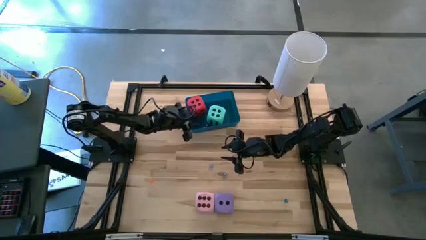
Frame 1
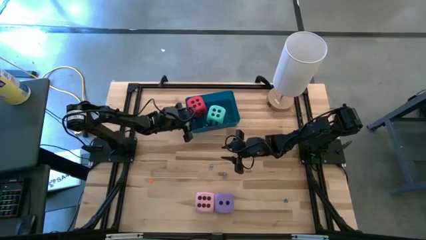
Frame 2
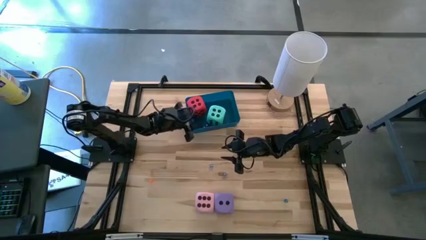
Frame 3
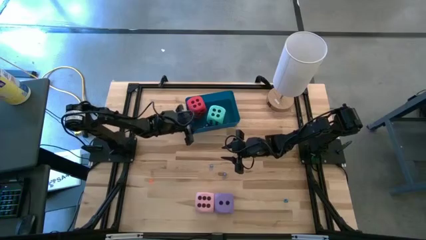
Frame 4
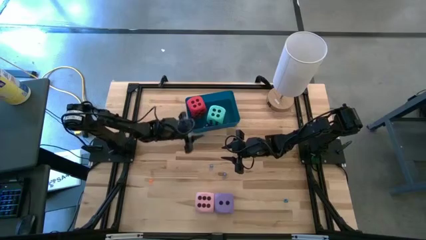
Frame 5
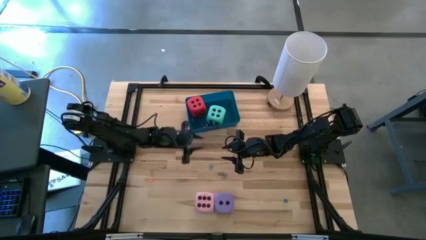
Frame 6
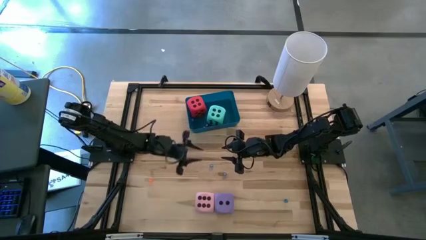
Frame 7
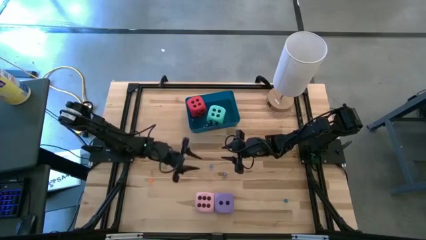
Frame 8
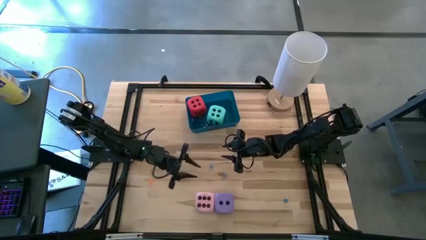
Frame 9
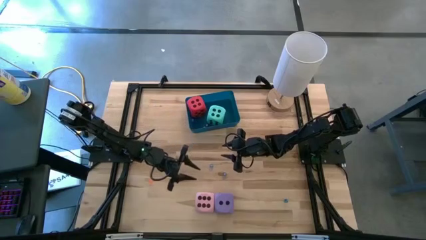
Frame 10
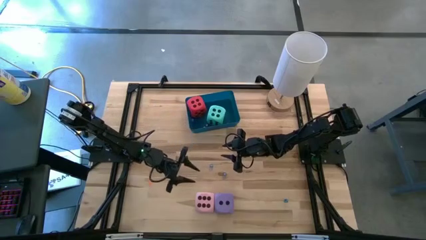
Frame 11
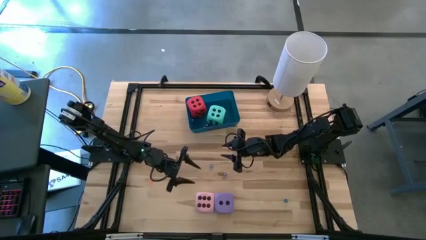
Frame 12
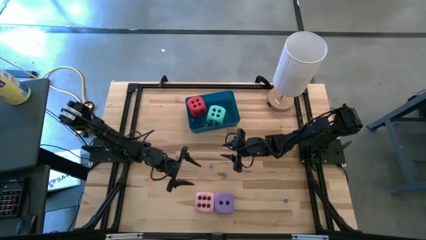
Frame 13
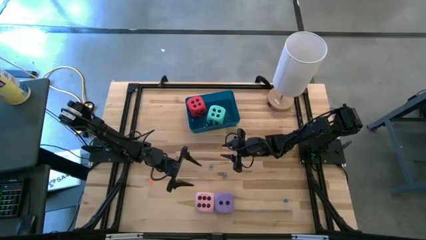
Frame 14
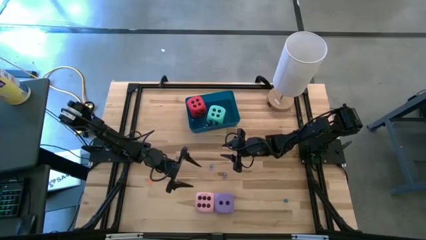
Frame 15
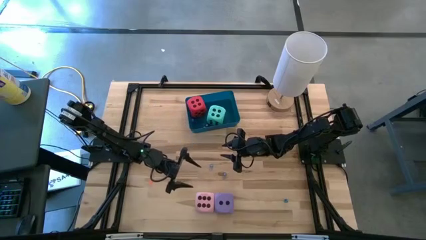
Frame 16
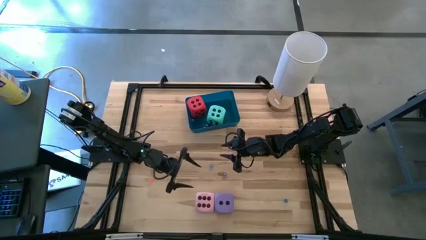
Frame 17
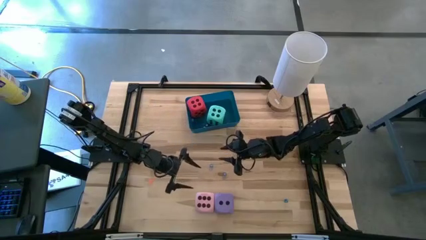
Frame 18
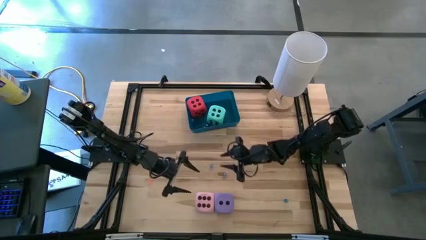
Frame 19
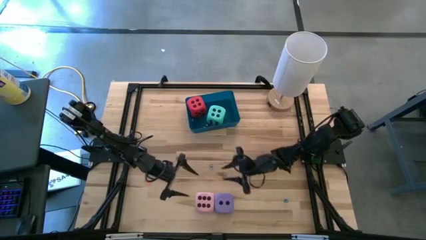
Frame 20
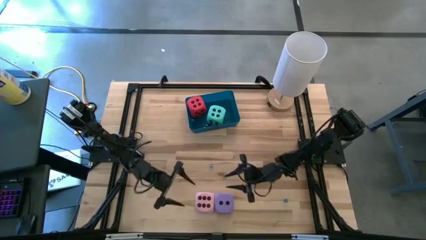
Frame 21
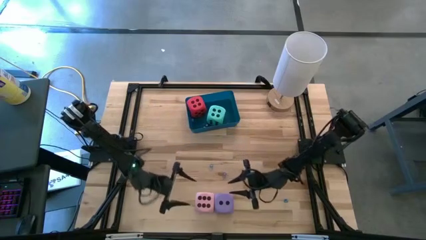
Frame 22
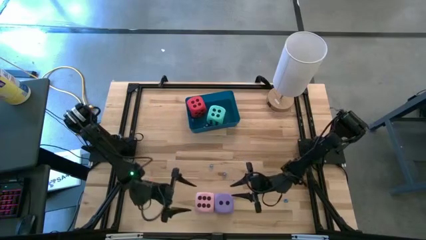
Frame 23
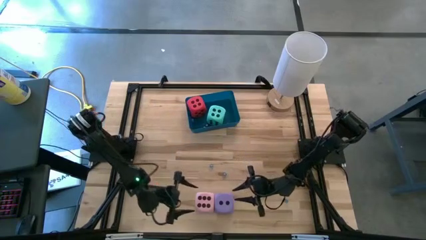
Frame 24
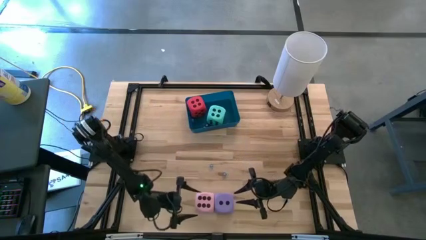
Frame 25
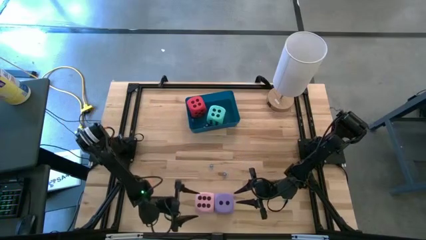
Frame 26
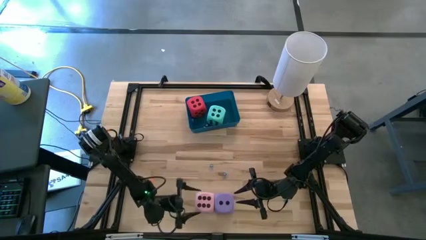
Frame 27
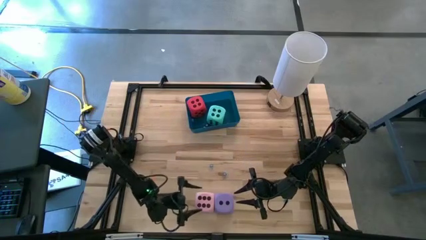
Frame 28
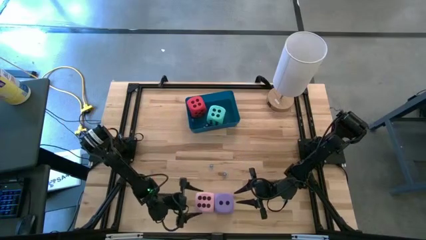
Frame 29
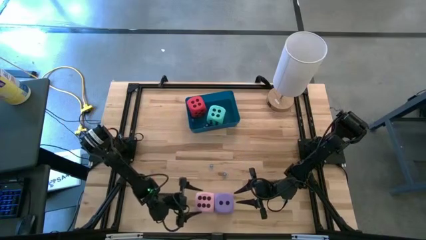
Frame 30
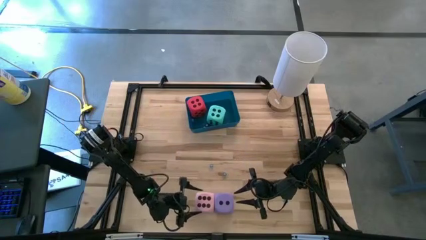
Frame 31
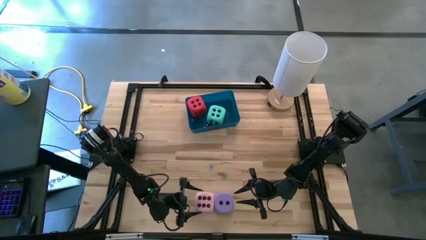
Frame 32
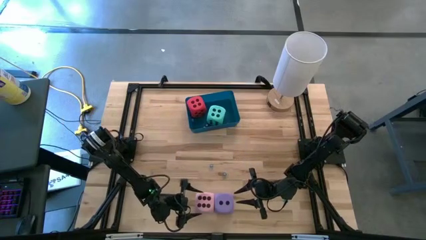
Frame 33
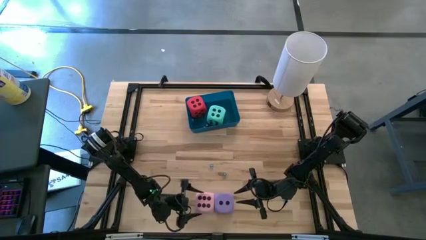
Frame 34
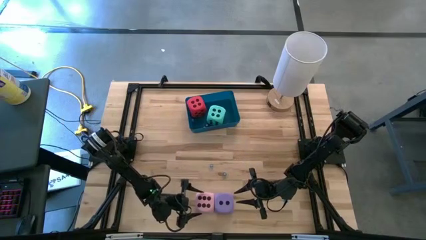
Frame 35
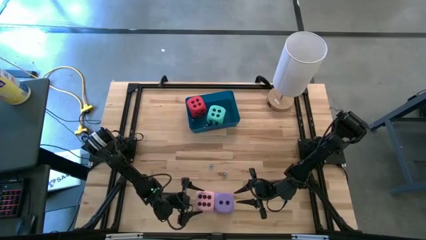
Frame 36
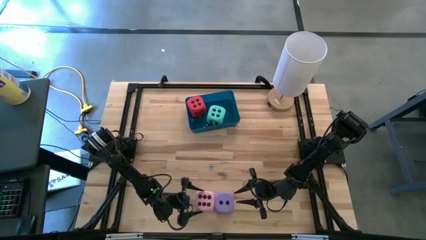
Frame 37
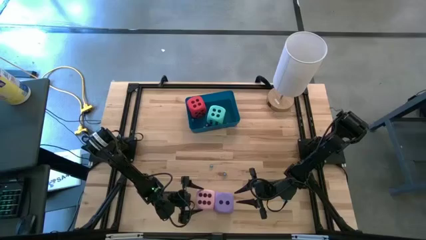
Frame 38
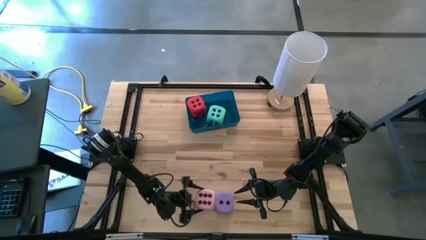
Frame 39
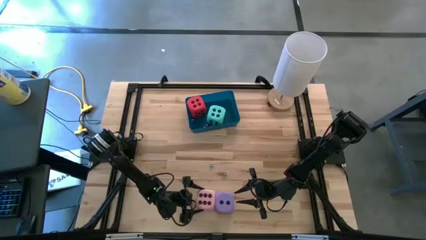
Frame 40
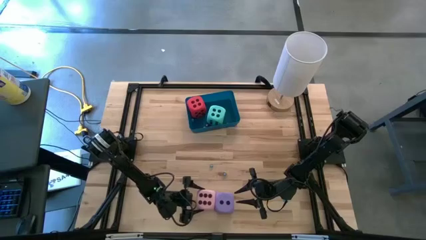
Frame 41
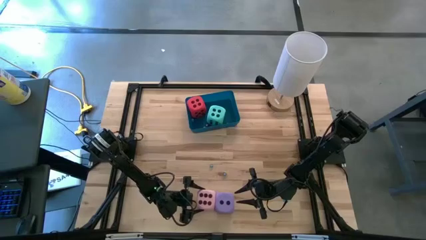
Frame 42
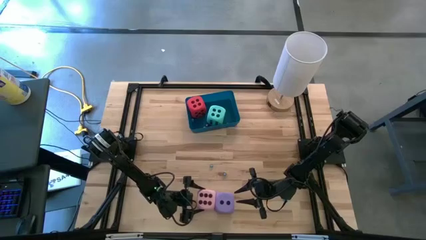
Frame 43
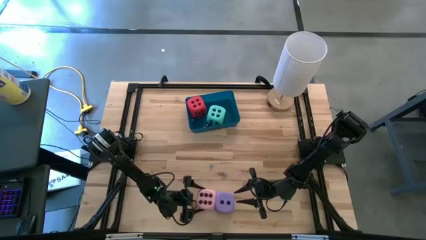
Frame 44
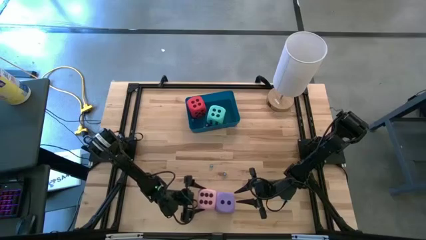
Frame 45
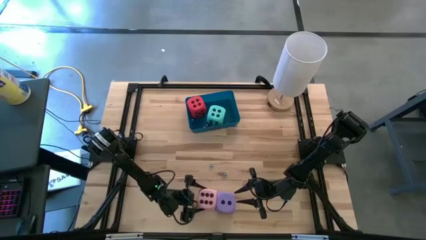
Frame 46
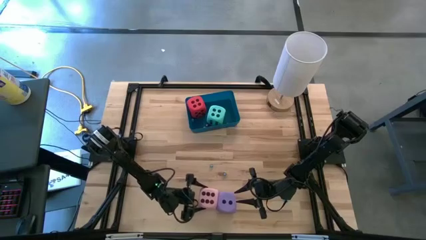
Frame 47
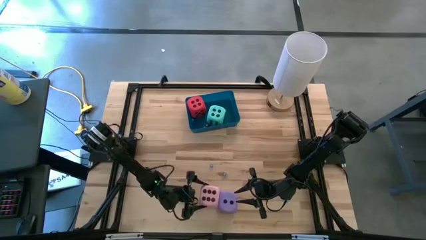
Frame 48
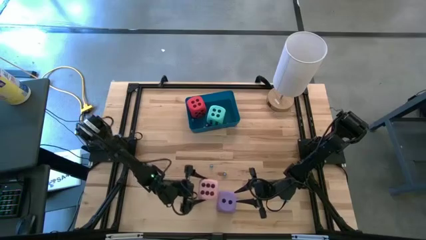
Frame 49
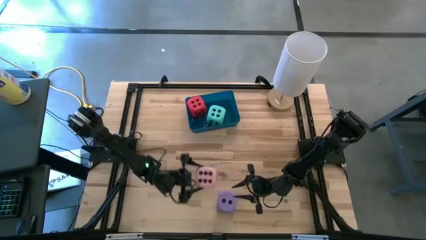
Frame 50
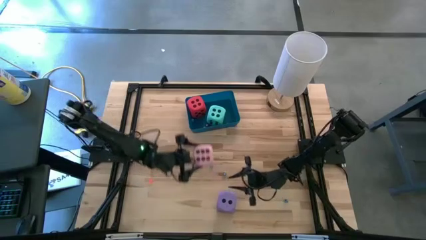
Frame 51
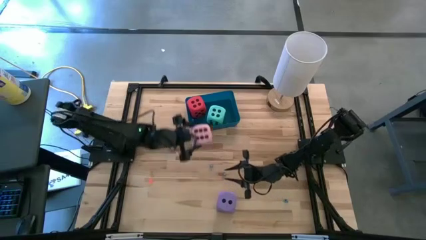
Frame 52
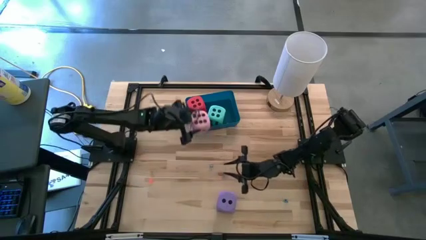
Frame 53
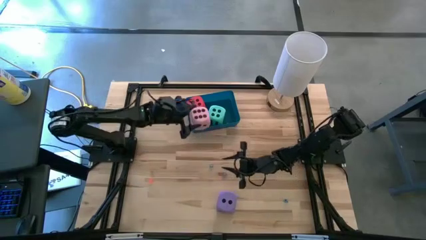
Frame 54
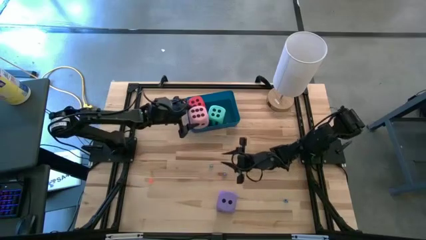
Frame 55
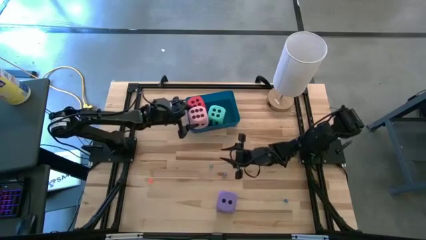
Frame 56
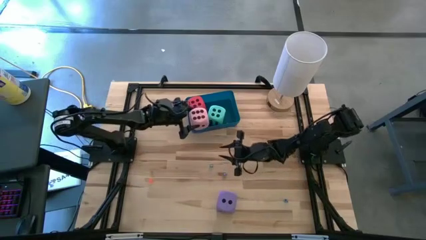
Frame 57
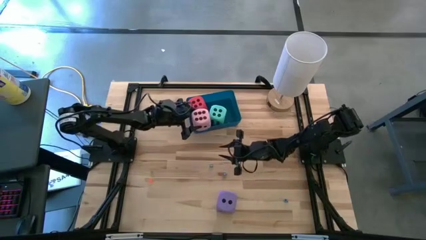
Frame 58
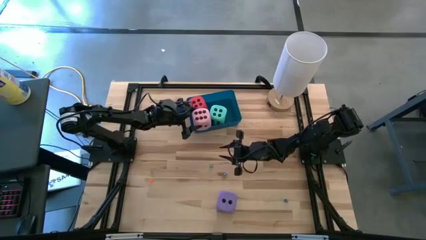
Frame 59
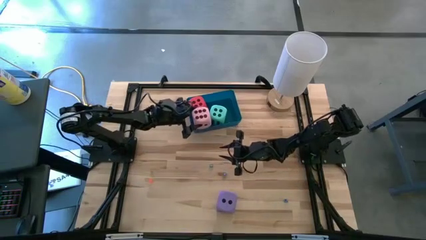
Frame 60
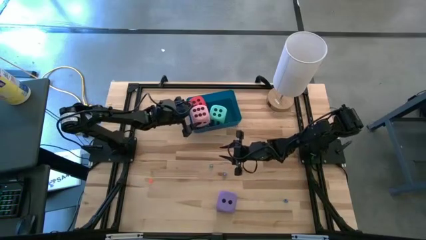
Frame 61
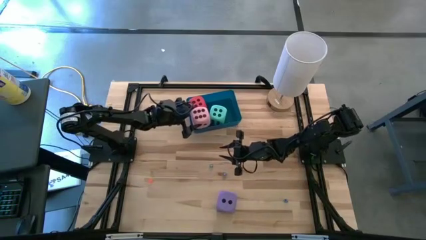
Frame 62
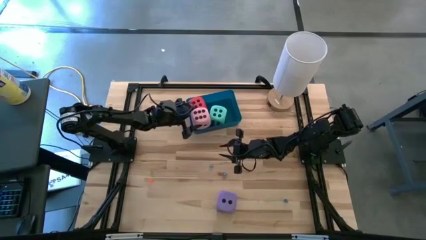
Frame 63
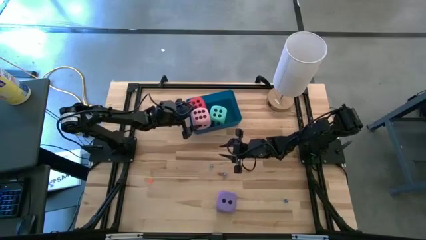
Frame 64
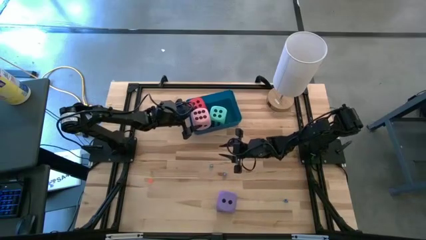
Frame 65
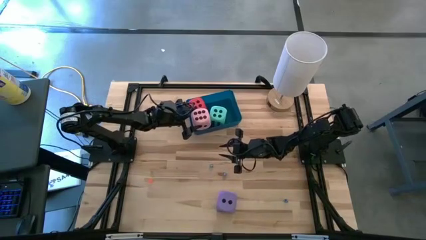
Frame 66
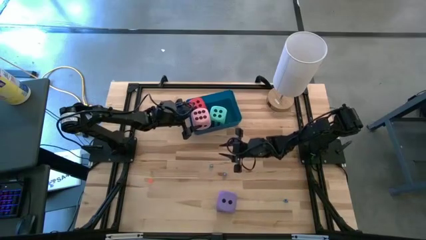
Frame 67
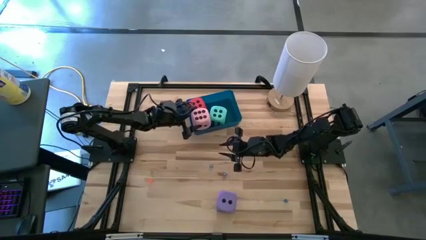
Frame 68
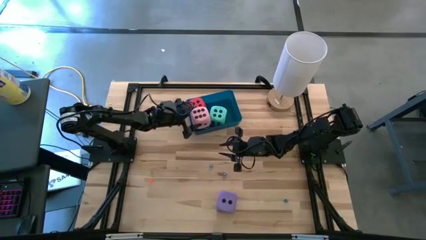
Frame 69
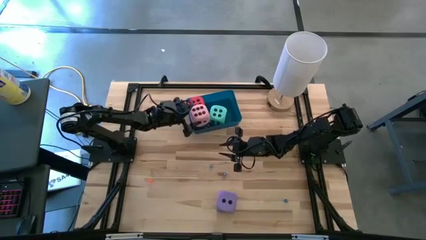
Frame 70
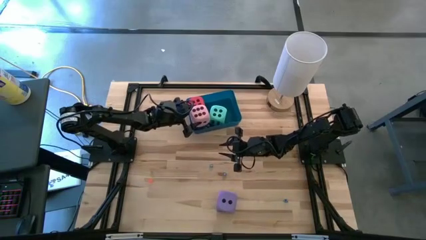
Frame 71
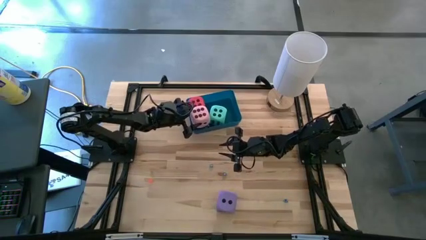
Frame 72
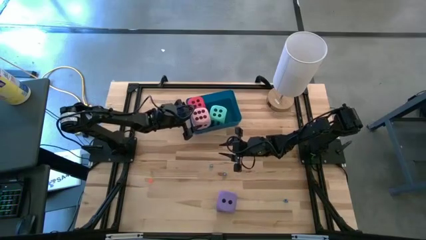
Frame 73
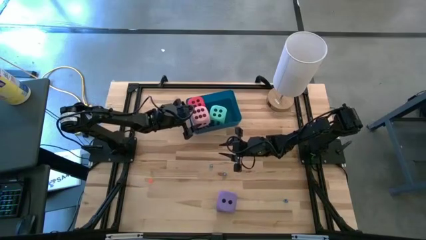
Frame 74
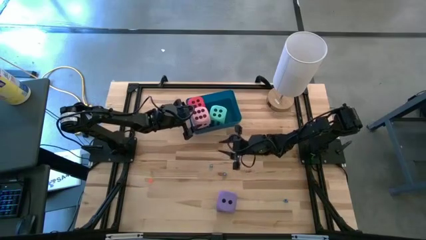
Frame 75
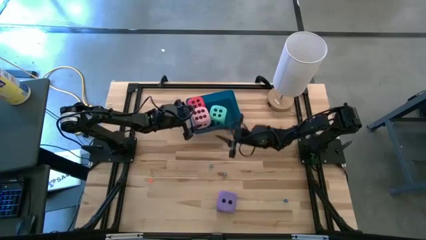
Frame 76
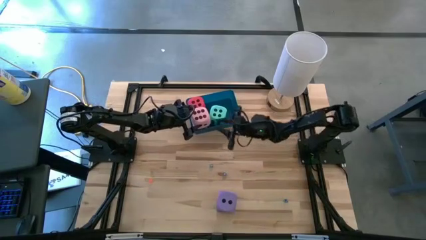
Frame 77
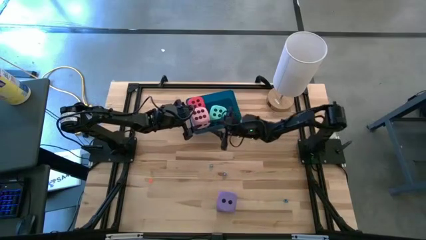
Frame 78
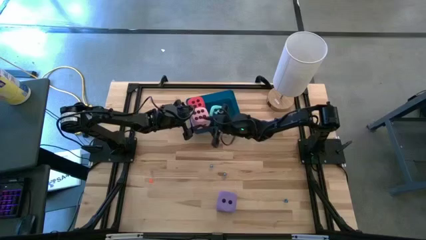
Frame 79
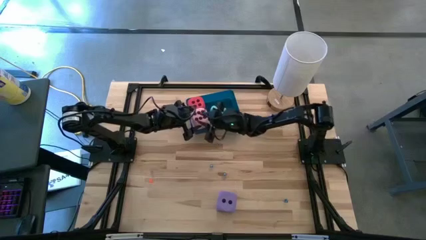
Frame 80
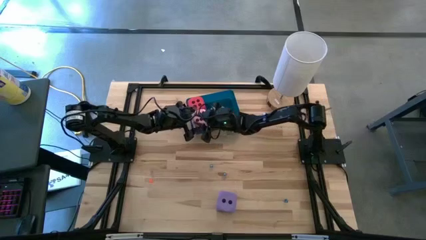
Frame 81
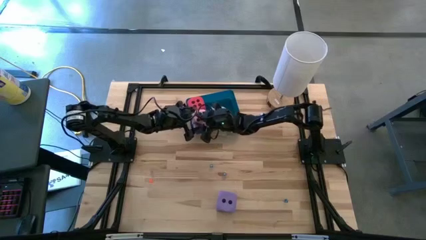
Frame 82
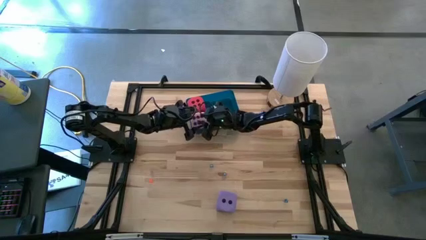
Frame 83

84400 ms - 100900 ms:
Task: Pick & Place Dice
Put the large pink dice into the blue bin
